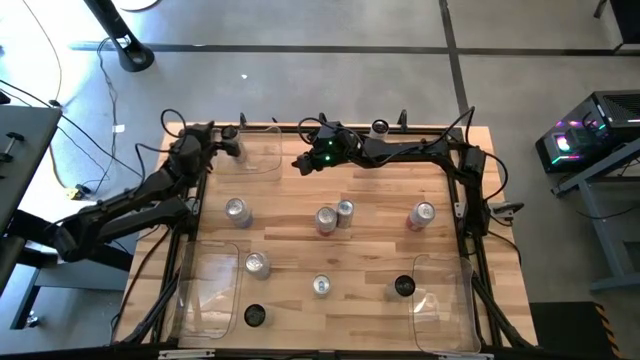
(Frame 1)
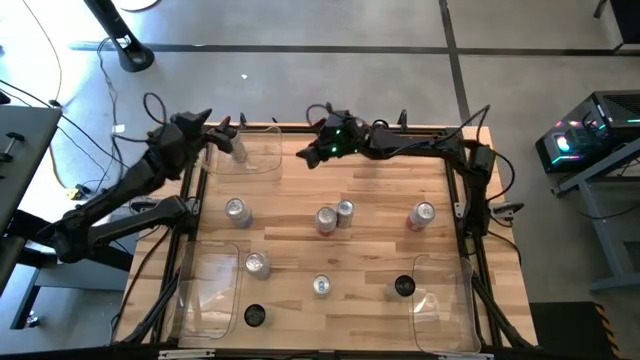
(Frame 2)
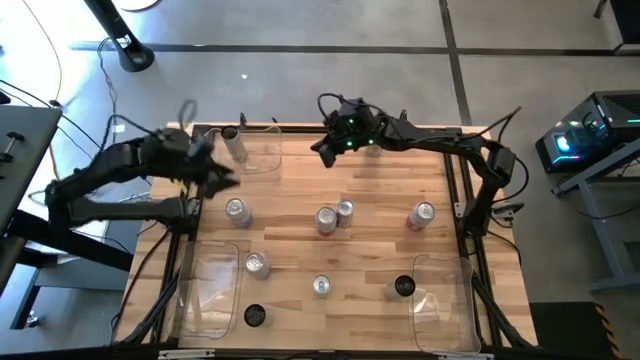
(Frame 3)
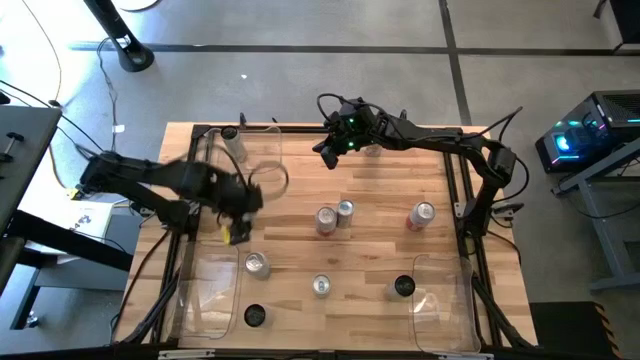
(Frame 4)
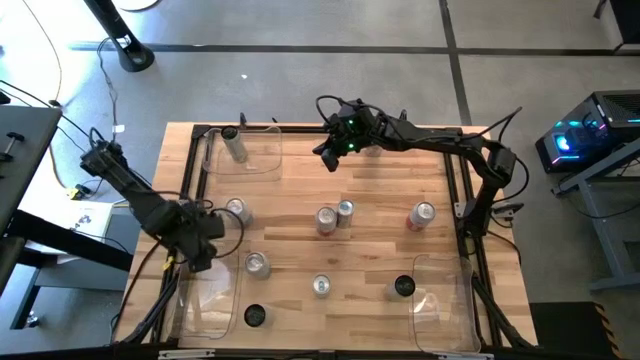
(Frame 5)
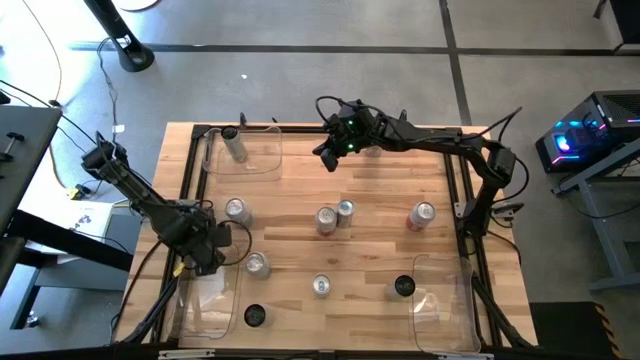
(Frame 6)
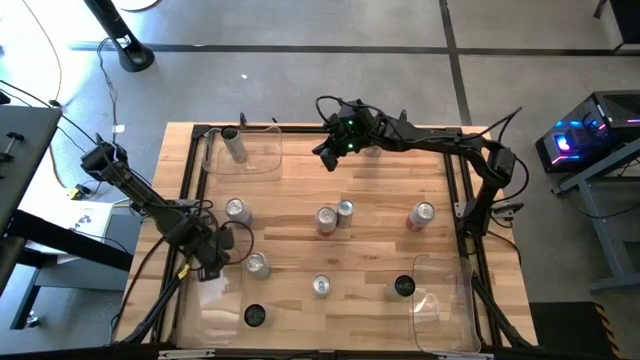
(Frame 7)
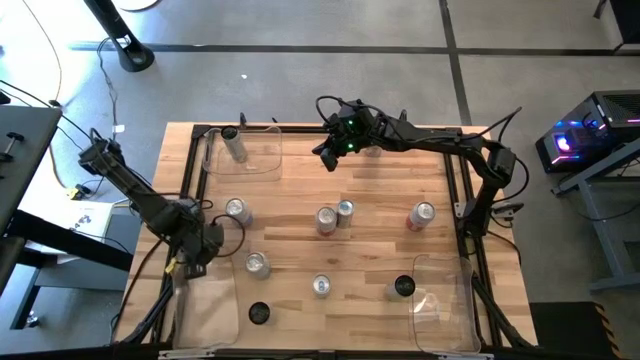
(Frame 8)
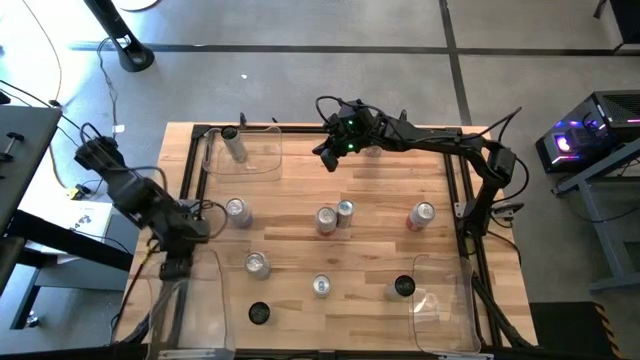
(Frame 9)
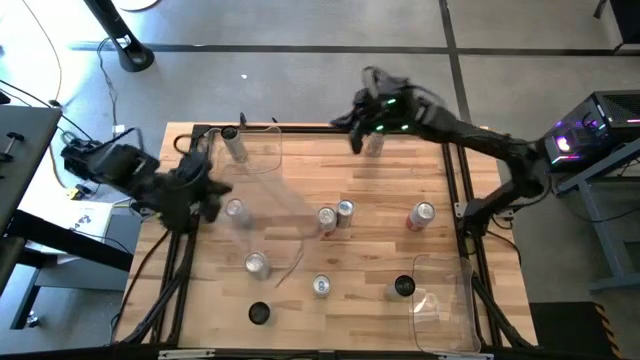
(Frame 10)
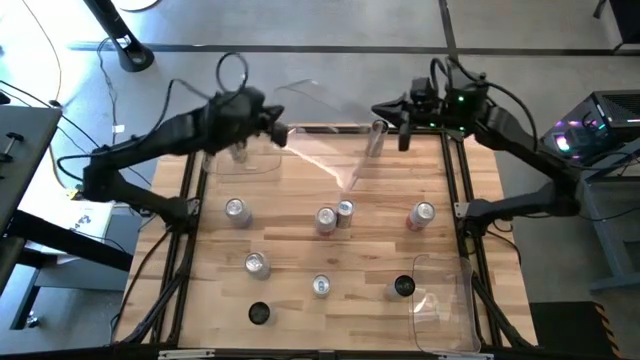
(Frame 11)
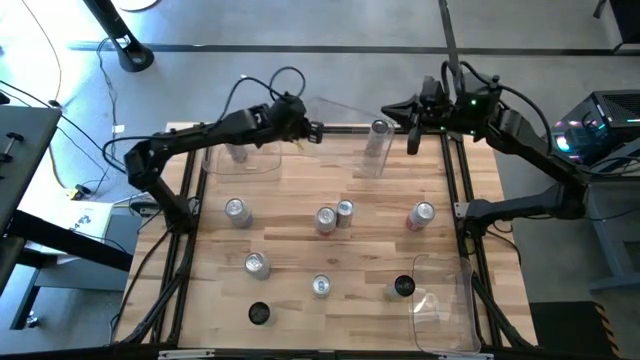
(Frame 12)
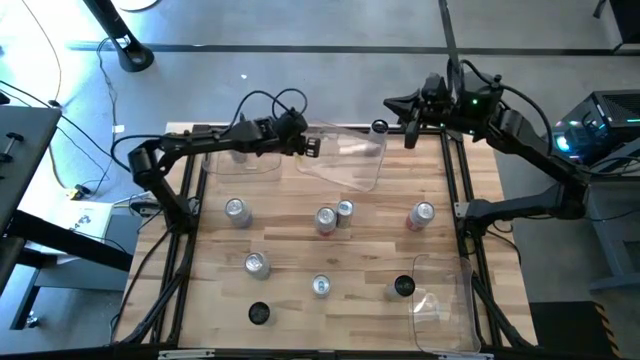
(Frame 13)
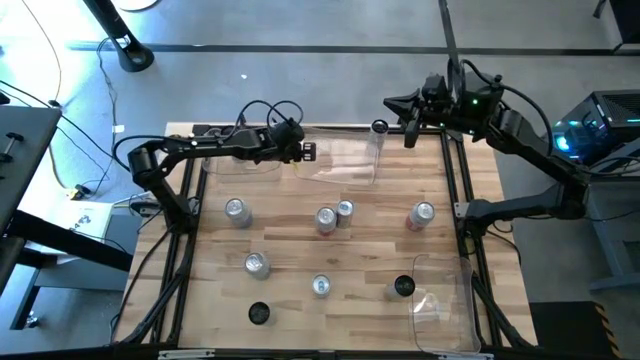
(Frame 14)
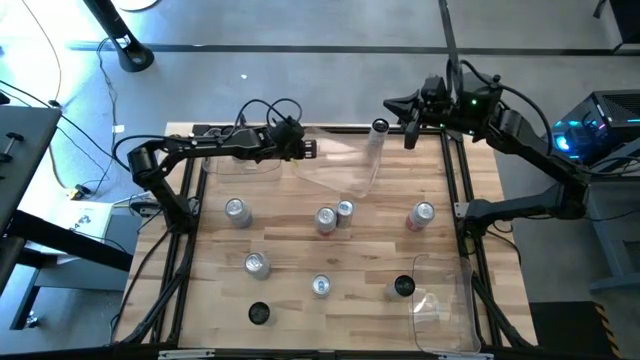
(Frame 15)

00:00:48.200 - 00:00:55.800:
Task: Sort soda cans
Move the bottom left transparent bin to the top center of the table

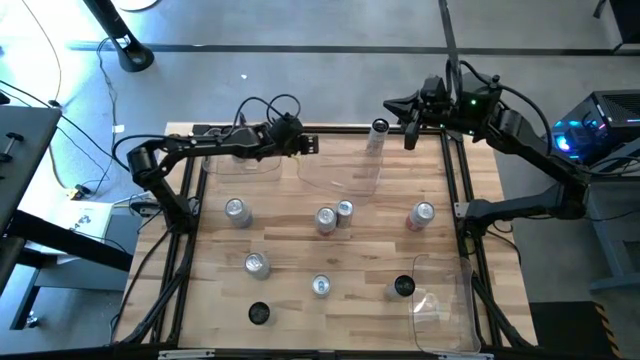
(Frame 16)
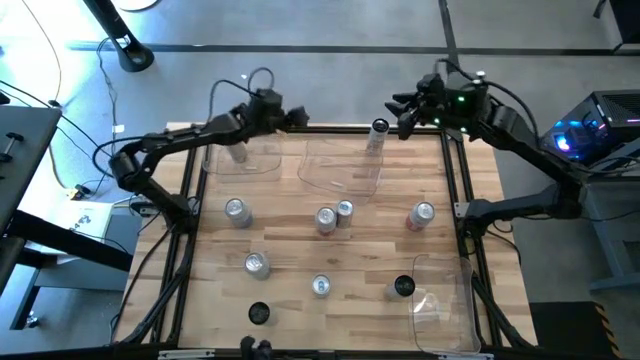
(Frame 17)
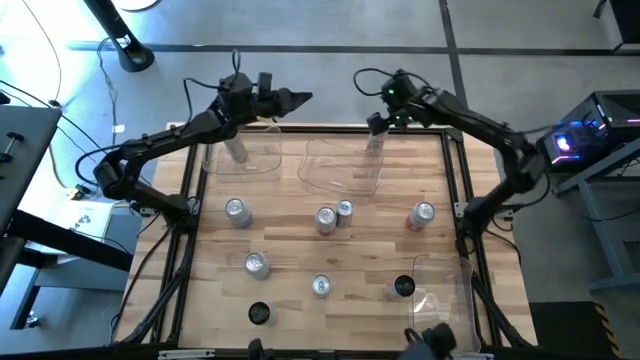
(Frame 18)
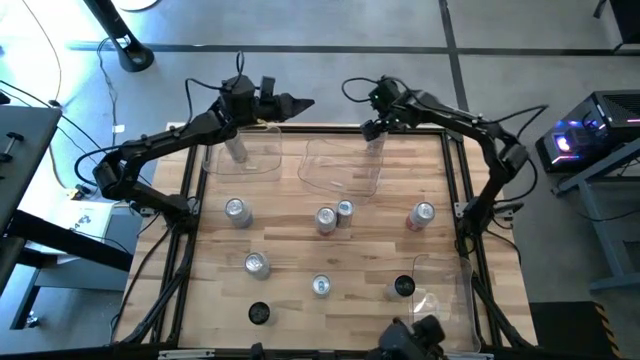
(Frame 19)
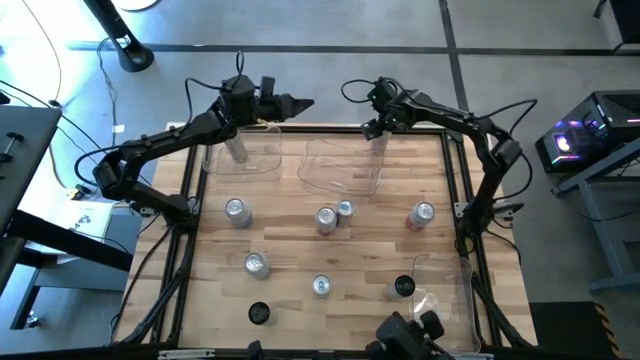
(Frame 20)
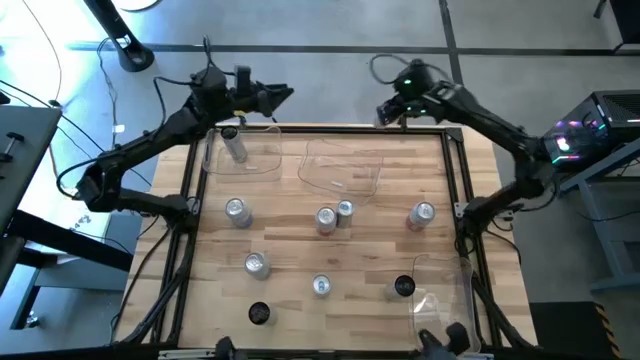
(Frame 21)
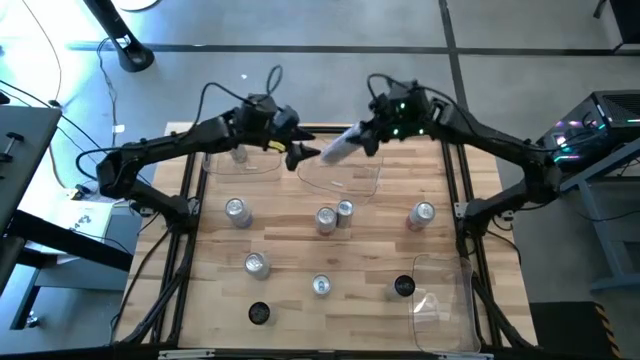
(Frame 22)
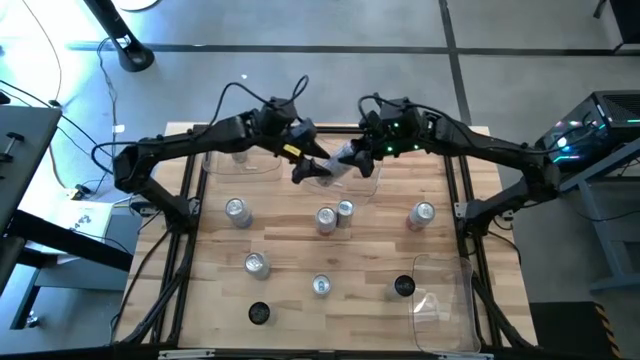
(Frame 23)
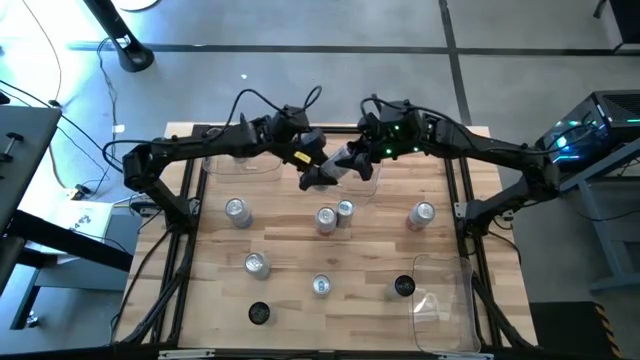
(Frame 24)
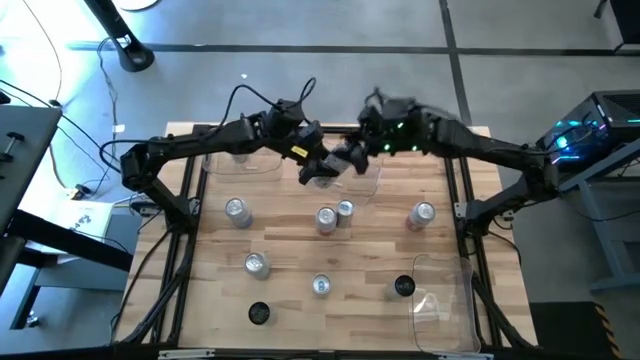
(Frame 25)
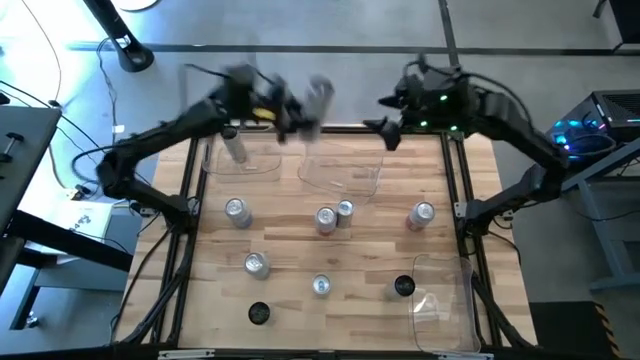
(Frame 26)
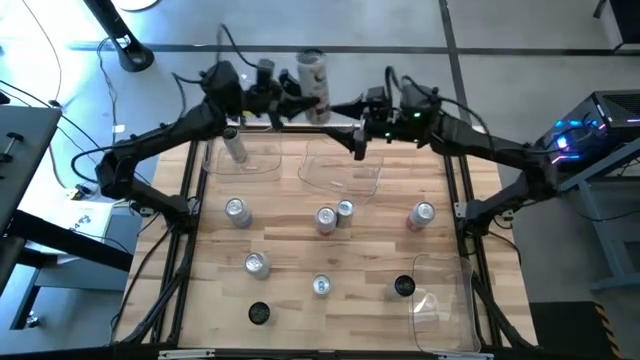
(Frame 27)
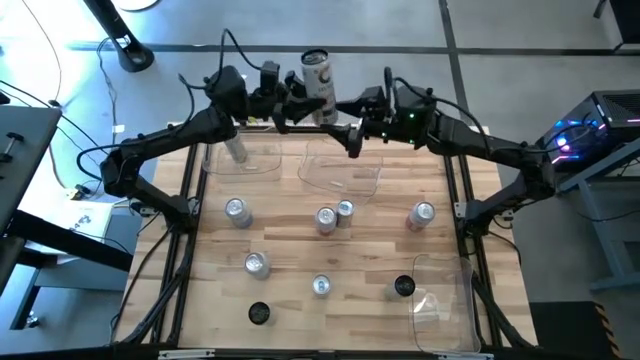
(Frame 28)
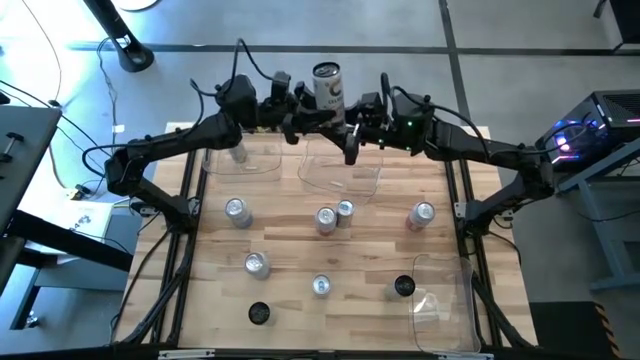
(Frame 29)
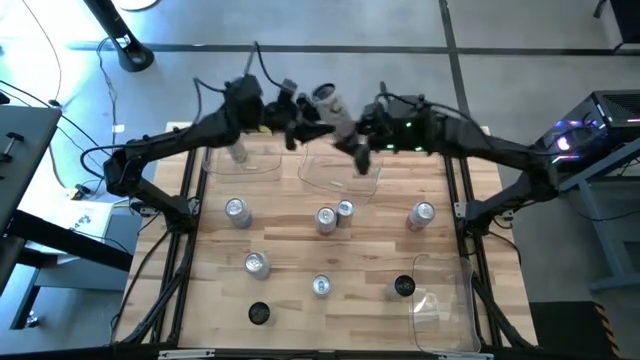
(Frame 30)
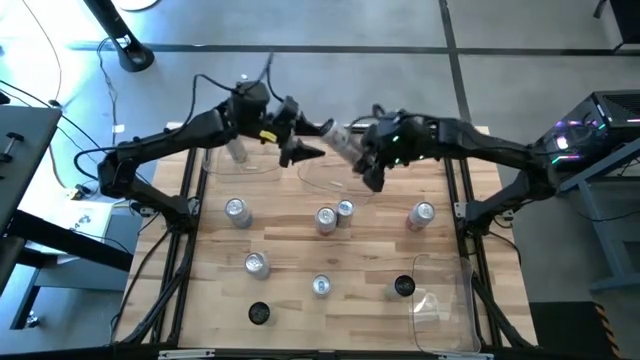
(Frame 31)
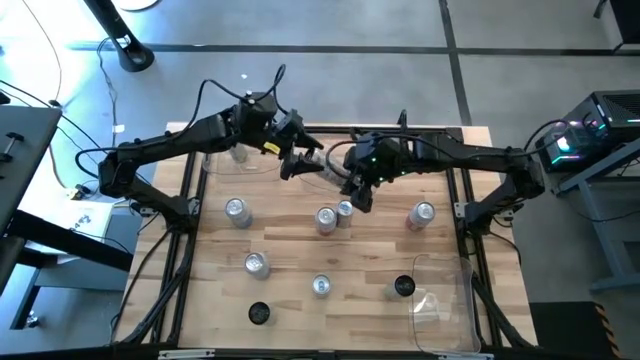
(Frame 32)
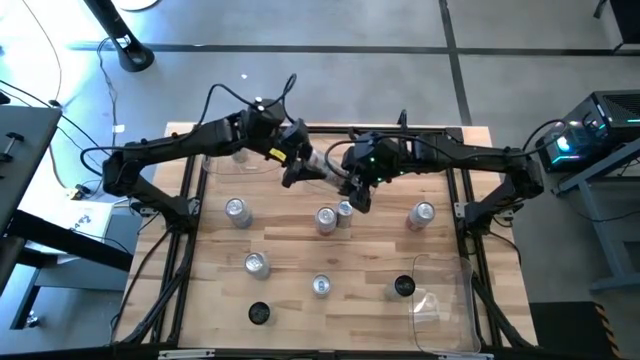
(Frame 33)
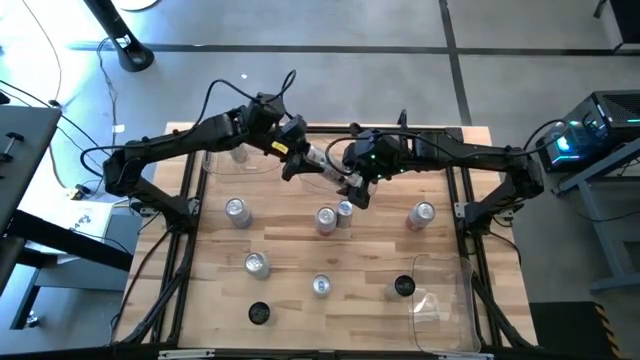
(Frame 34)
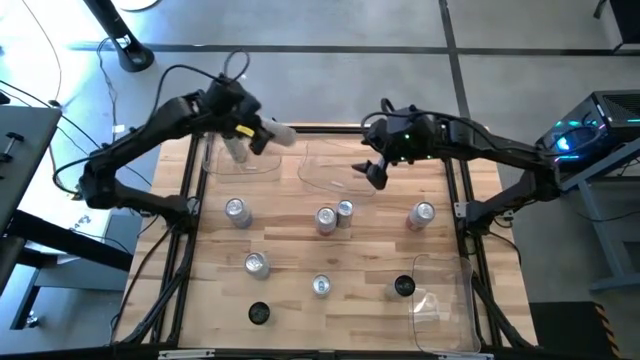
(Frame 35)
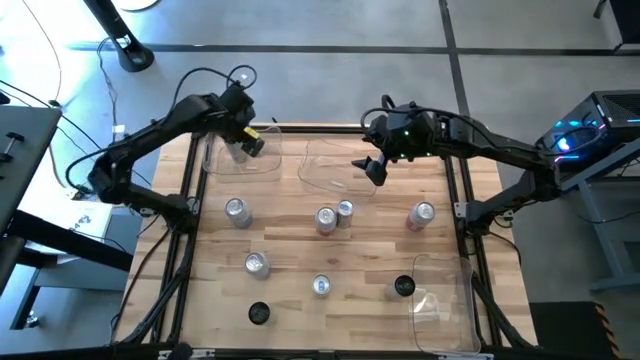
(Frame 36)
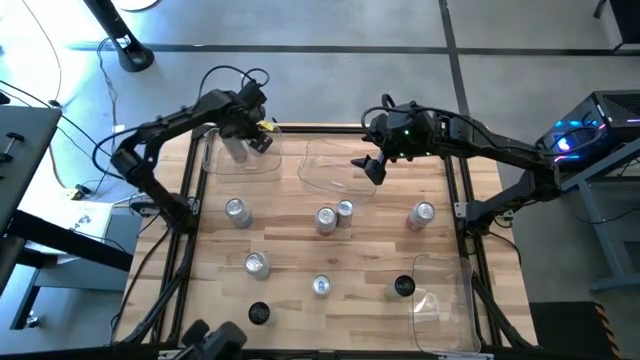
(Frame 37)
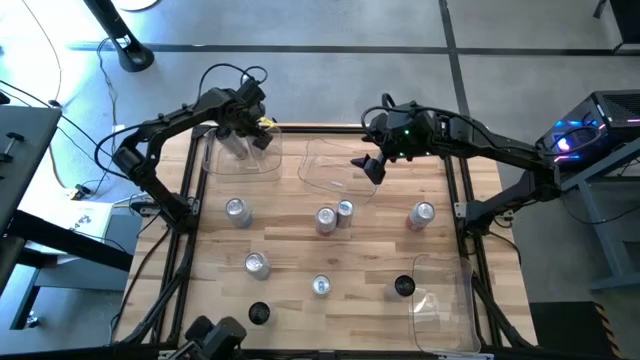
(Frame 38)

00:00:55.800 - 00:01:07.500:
Put the top white-yellow soda can into the top left transparent bin

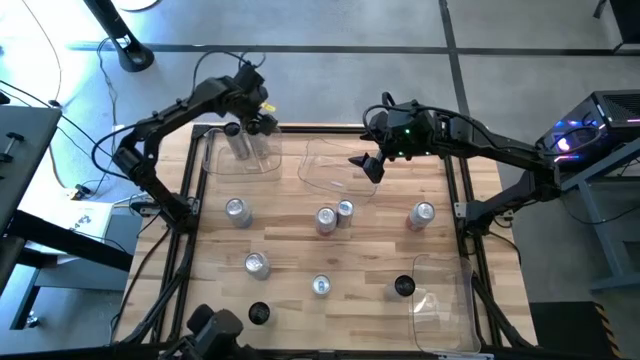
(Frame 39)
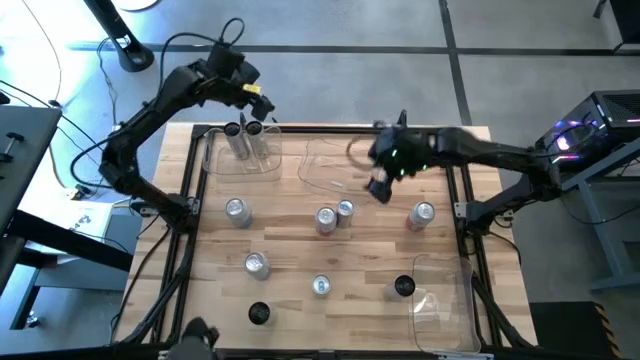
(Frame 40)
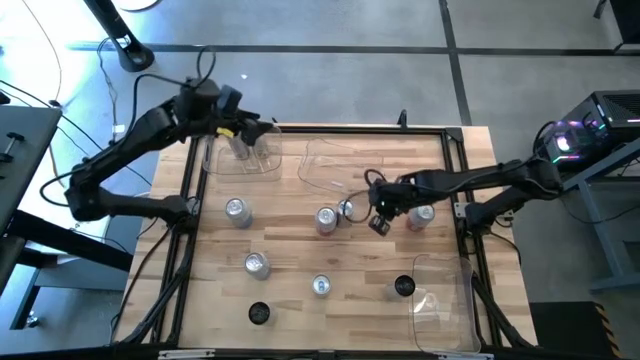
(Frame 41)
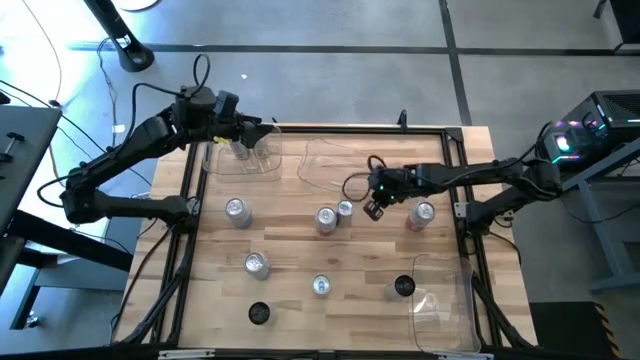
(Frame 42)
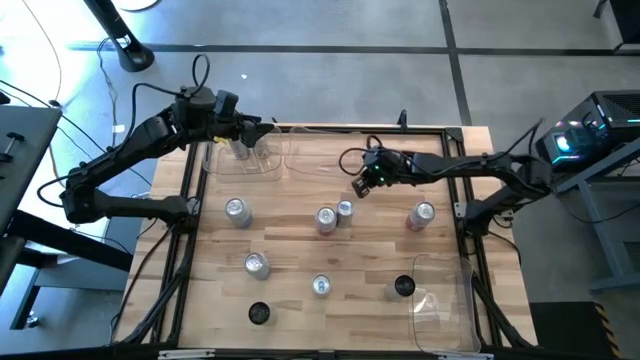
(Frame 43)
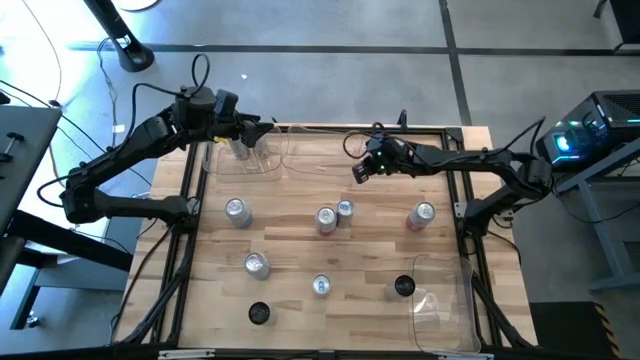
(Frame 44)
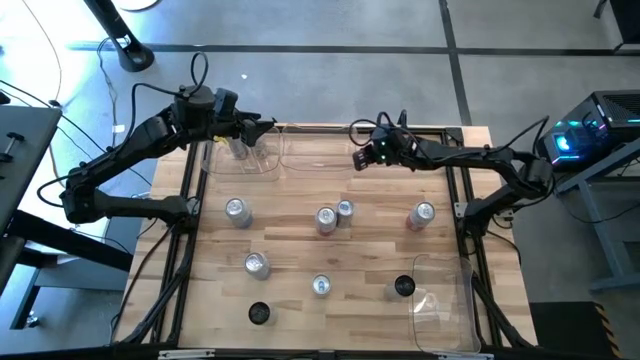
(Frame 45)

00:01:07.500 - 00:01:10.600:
Adjust the top right transparent bin
